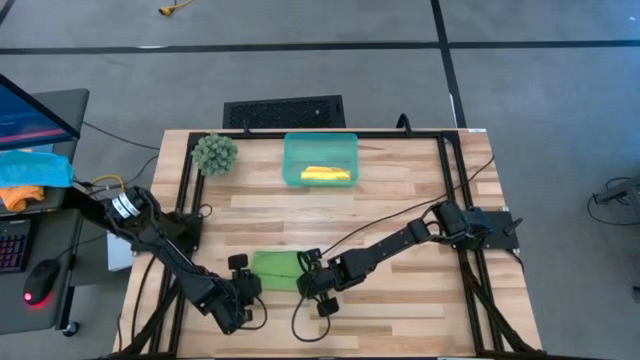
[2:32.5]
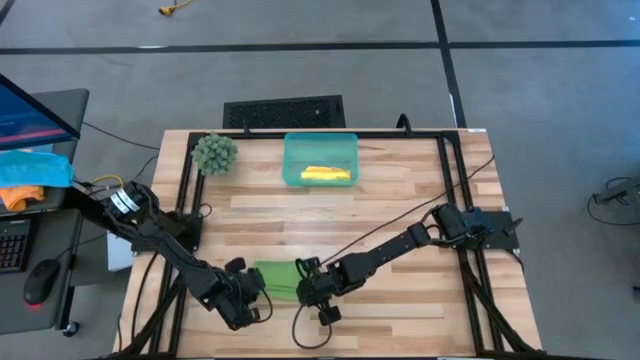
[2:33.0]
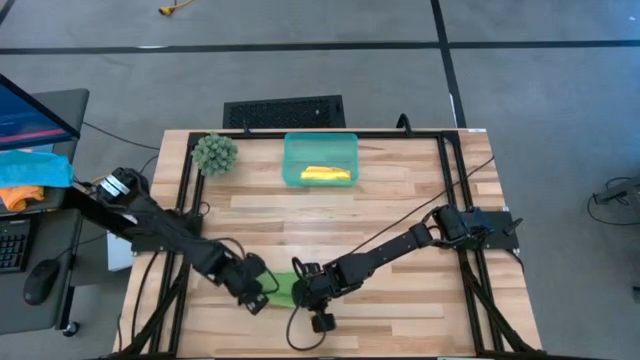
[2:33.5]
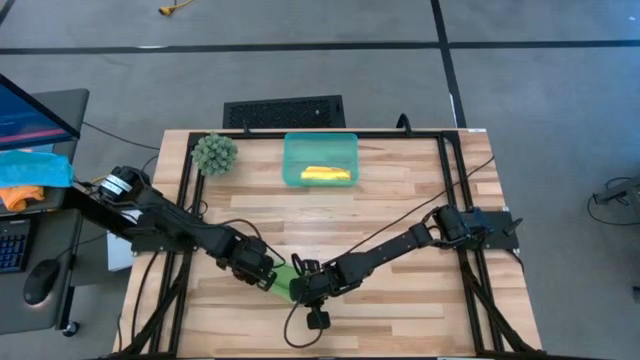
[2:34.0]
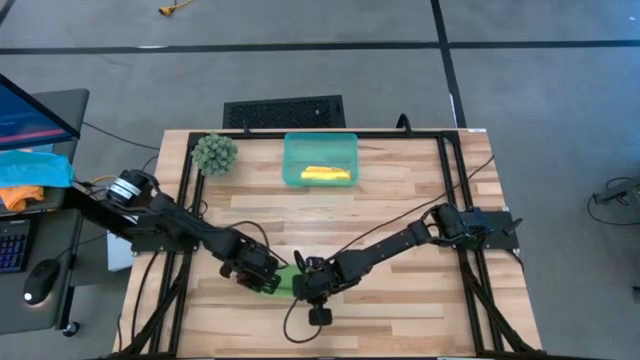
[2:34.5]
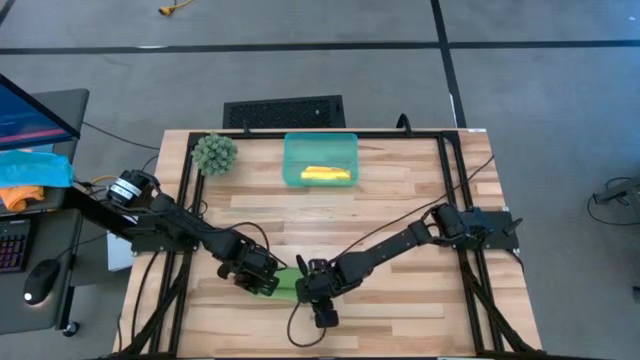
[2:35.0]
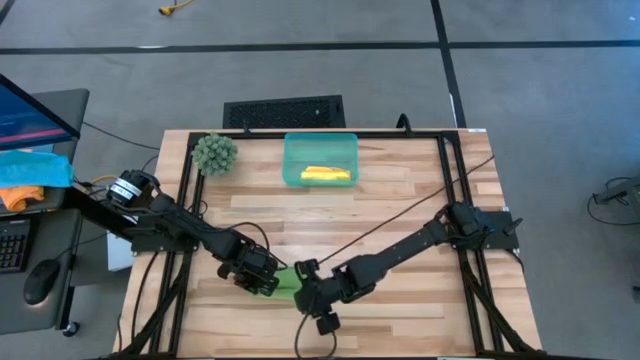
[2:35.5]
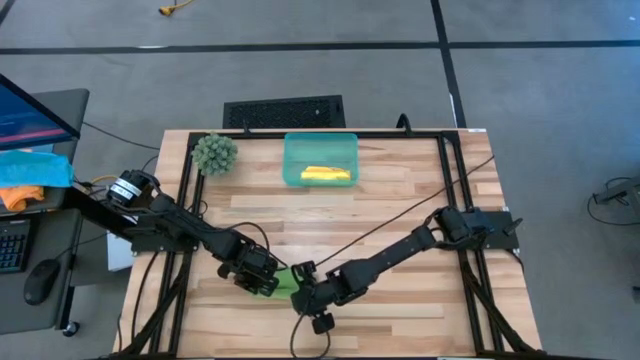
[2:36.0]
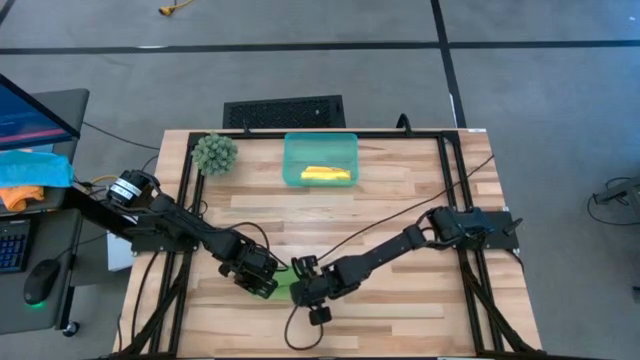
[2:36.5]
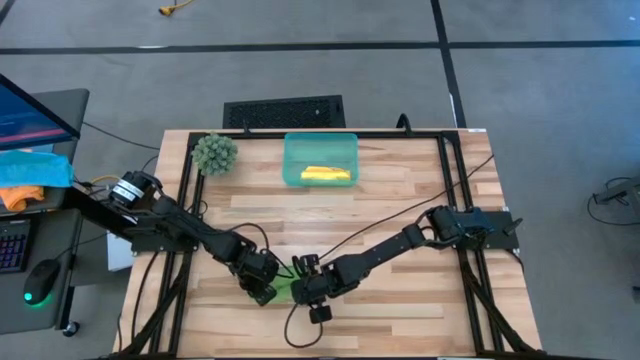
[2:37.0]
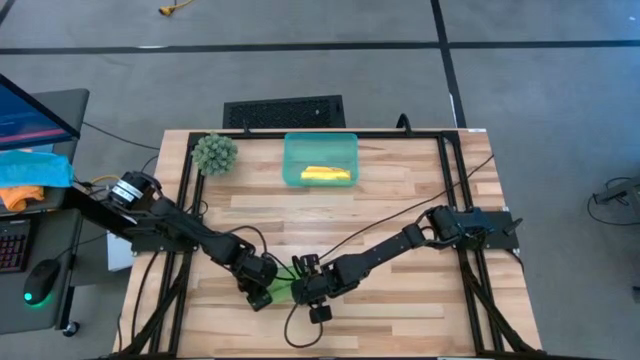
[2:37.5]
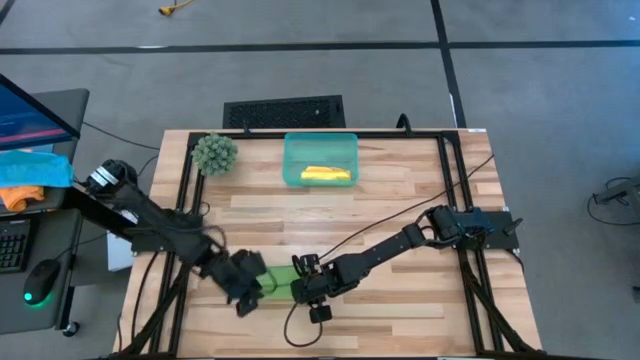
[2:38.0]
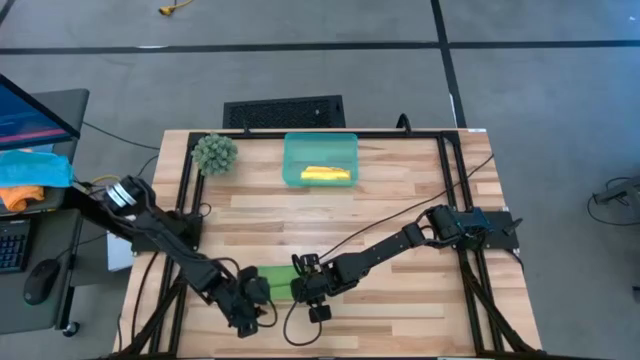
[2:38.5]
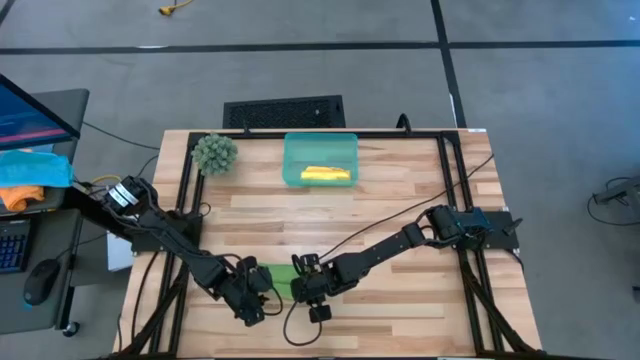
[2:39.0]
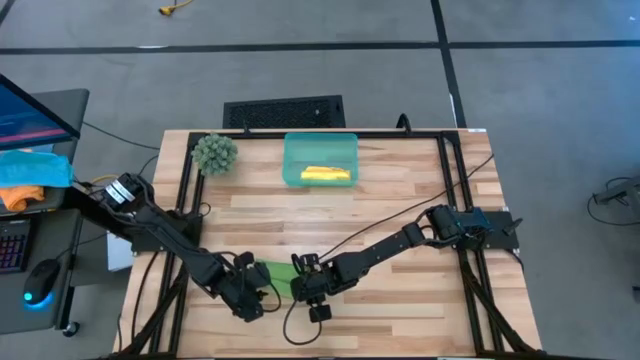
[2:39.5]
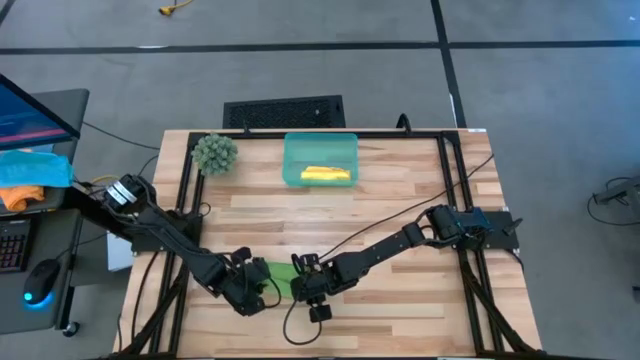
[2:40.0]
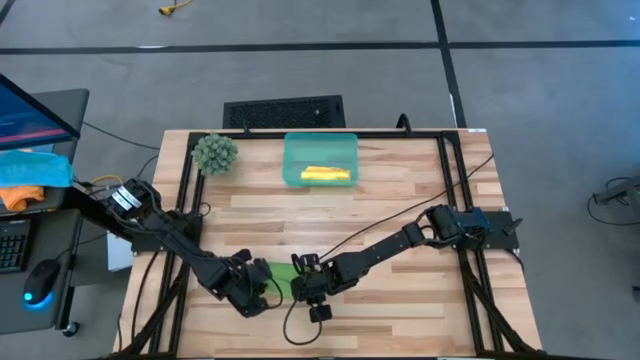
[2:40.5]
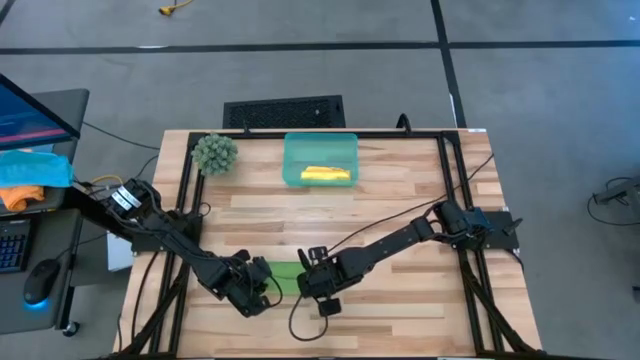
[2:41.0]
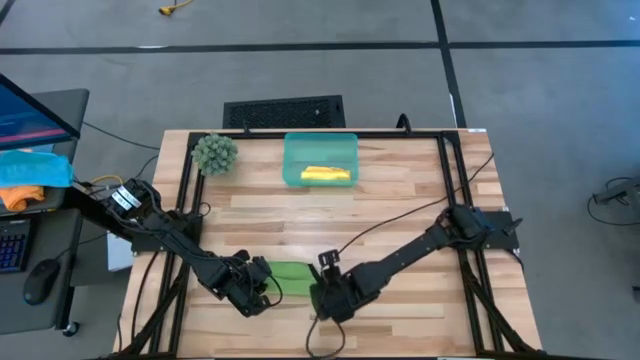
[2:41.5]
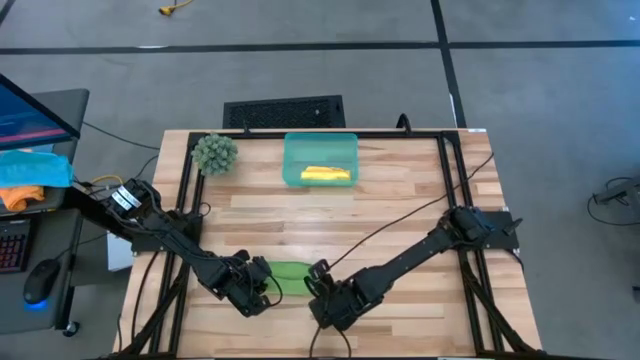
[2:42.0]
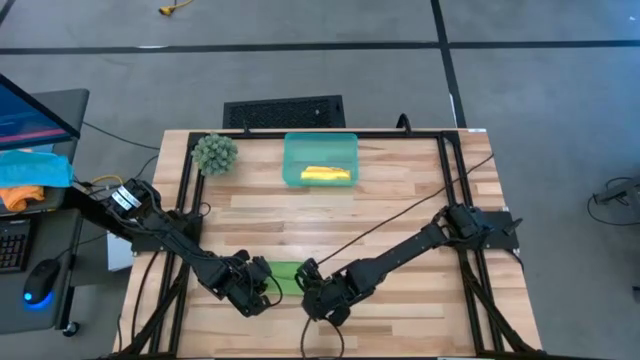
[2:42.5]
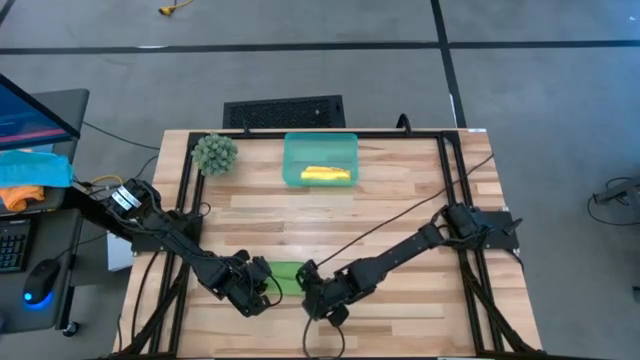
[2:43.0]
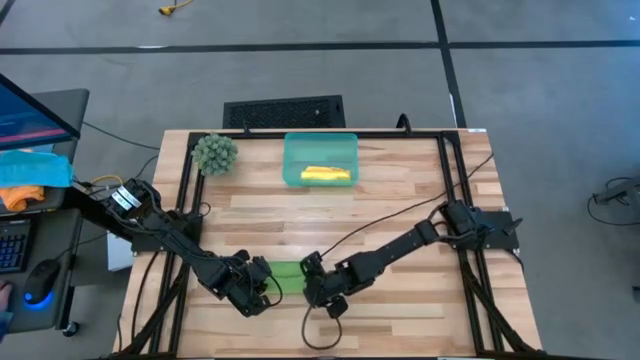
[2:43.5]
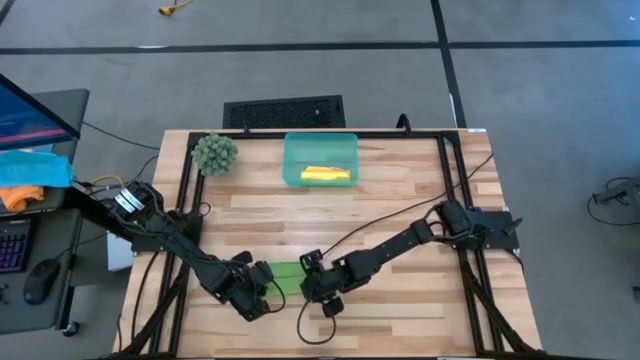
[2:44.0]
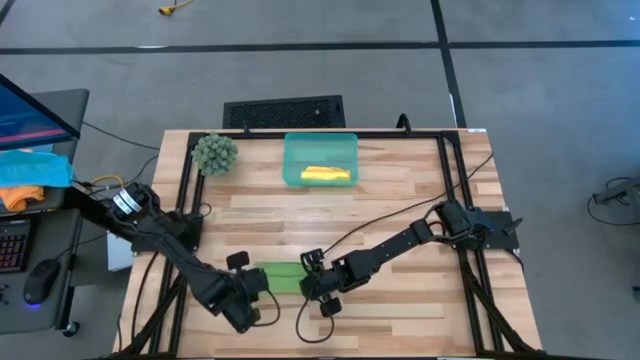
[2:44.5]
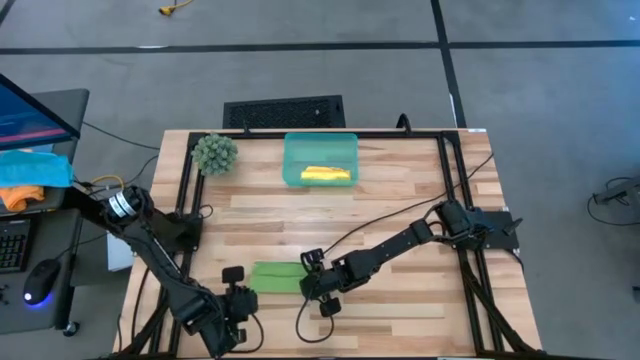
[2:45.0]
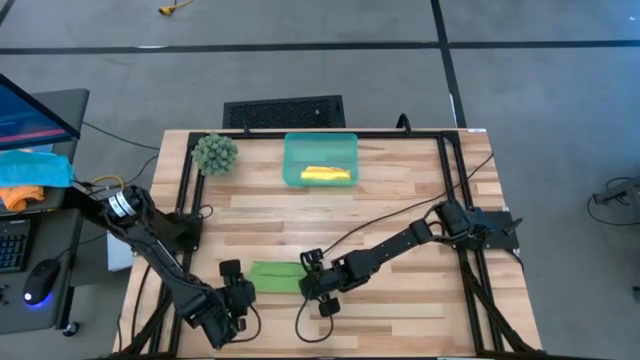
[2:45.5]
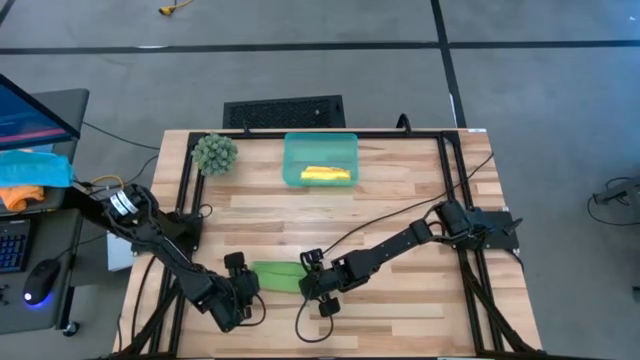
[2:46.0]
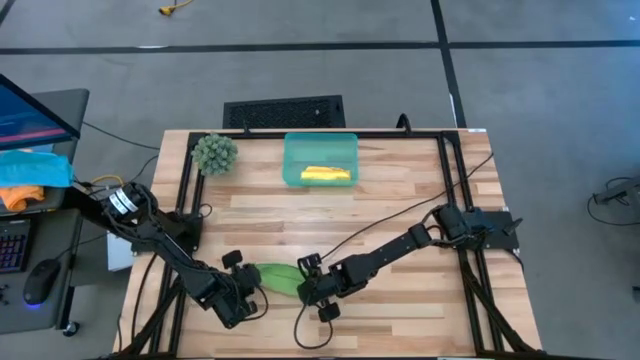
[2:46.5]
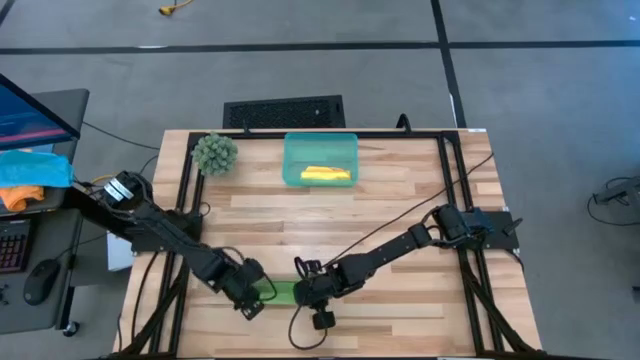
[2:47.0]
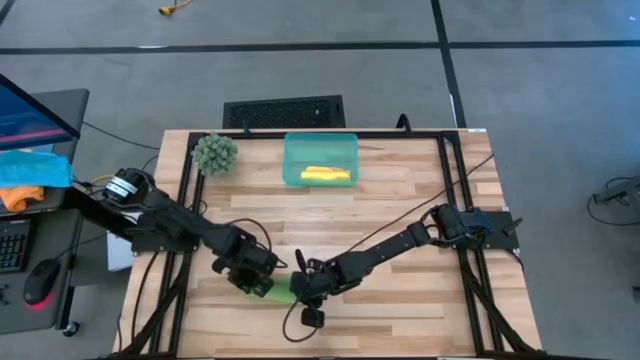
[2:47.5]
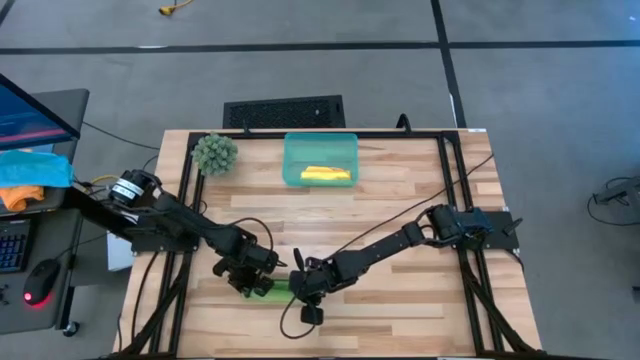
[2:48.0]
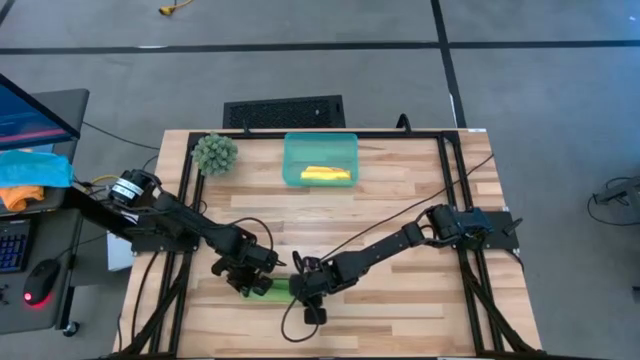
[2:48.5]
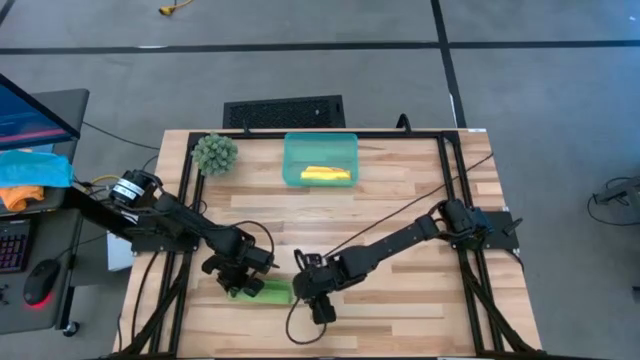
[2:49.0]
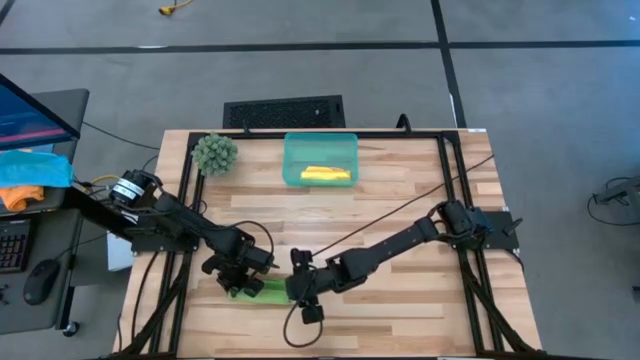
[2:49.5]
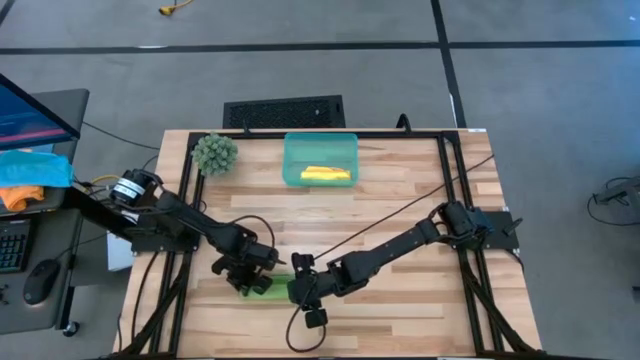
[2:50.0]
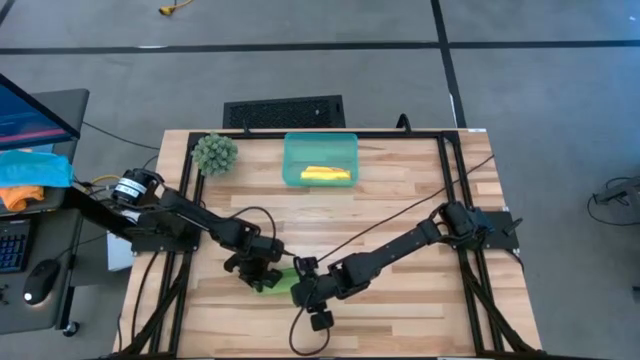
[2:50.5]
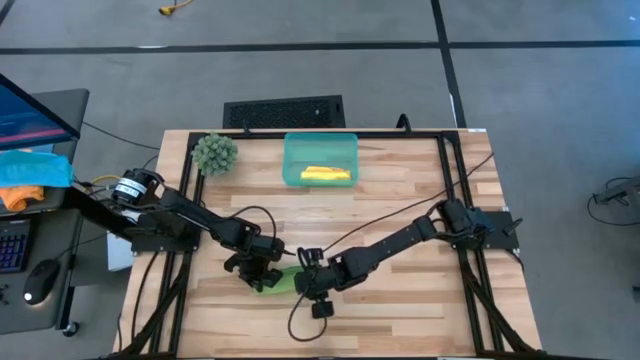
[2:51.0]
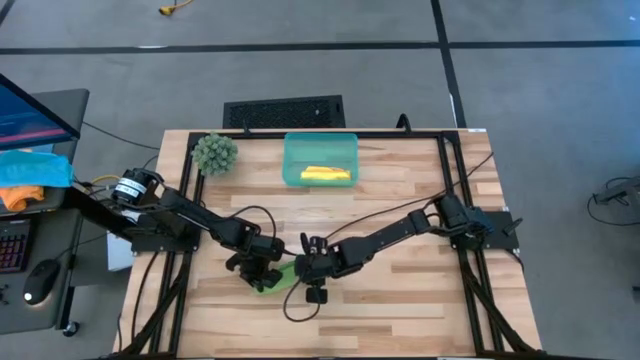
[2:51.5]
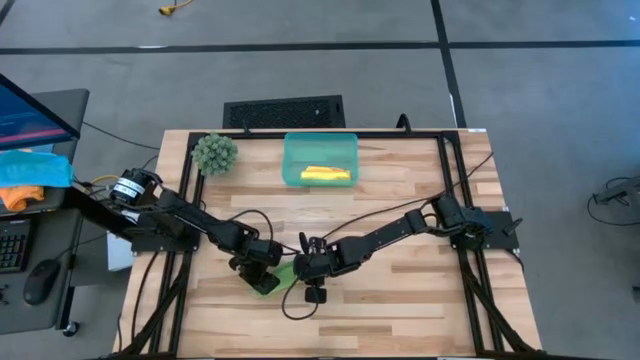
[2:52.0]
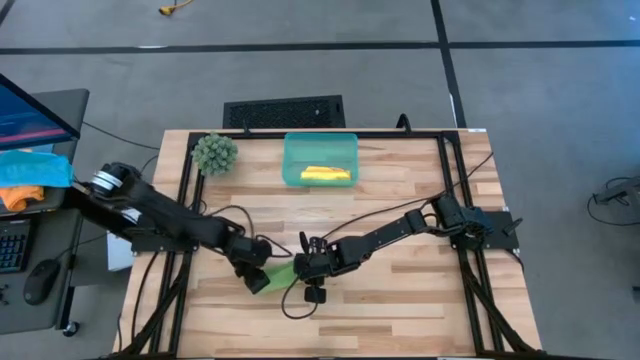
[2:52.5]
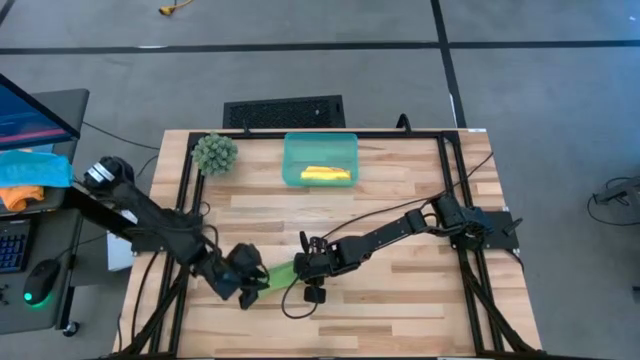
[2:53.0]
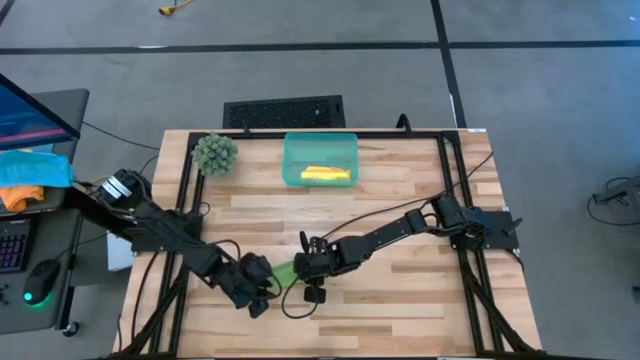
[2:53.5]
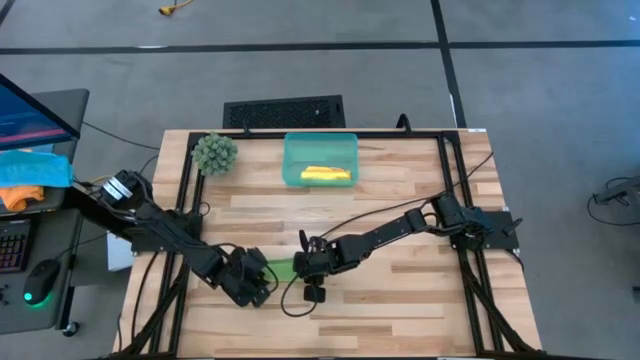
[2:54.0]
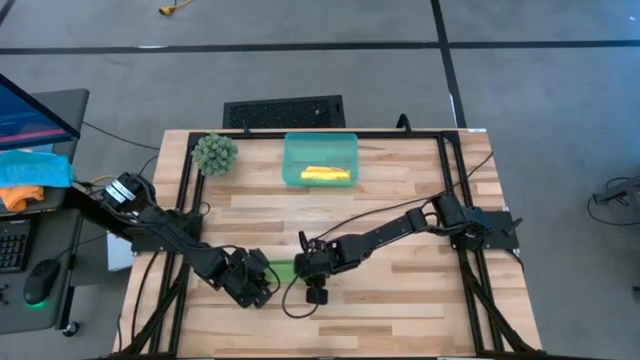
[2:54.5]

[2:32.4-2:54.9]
Task: Roll microfiber towels into tight, uniform cylinder then place into a basket
Roll the green microfiber cloth
